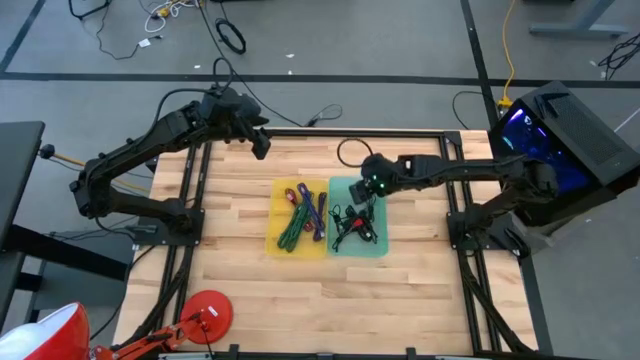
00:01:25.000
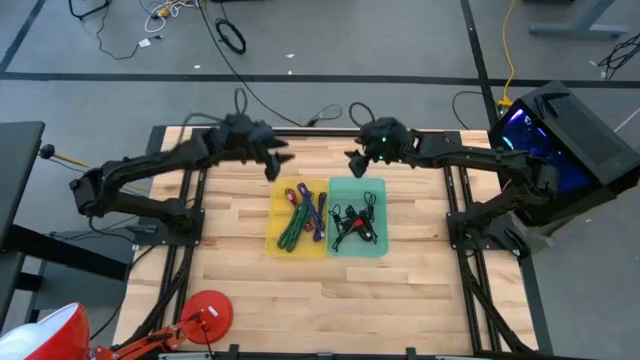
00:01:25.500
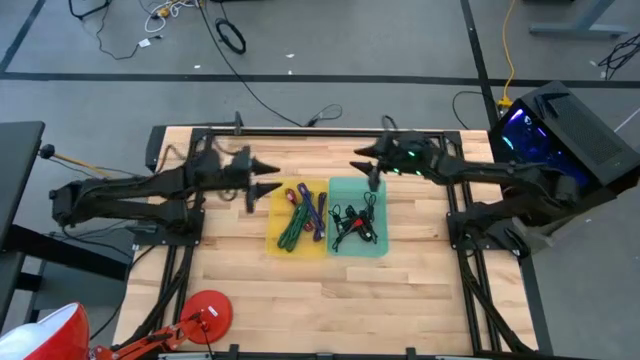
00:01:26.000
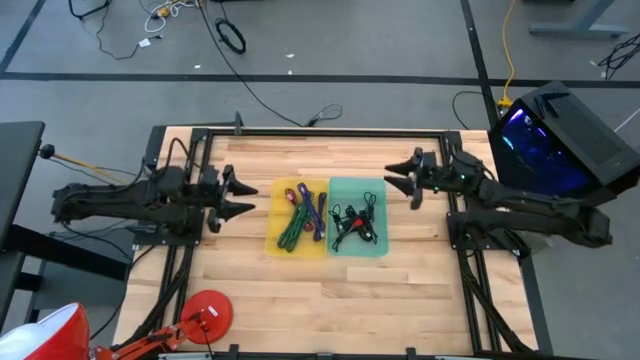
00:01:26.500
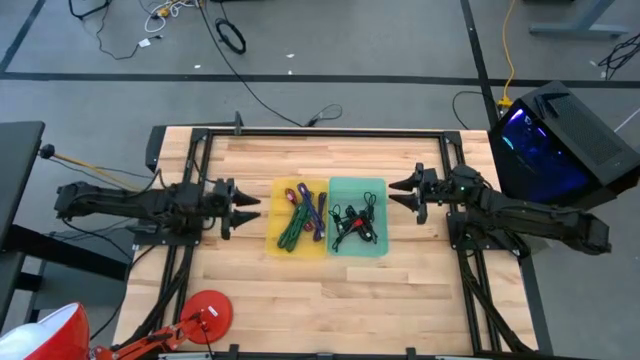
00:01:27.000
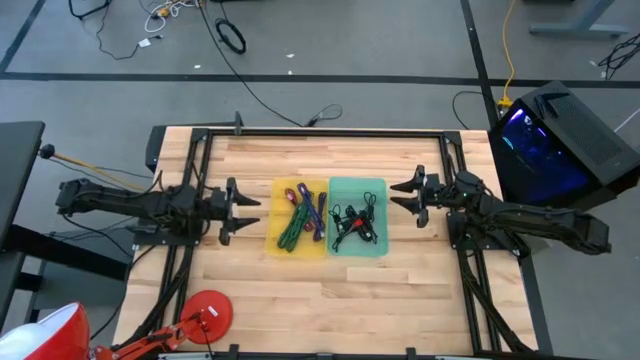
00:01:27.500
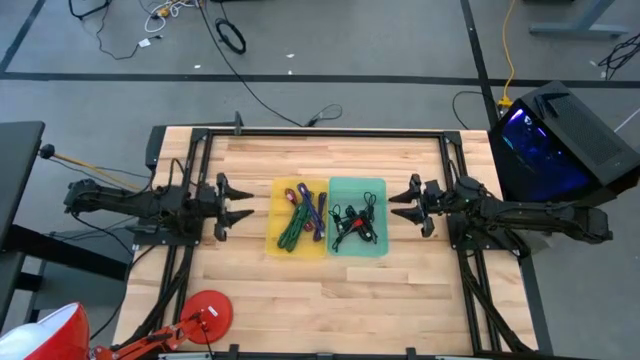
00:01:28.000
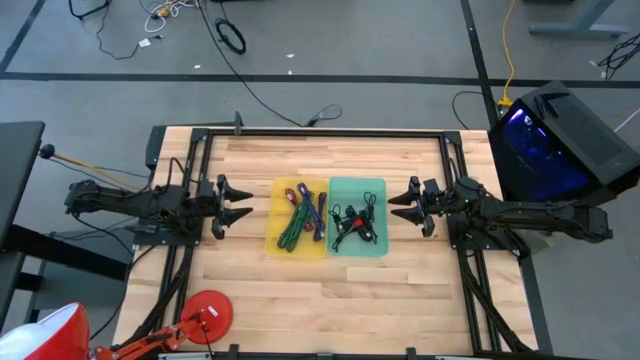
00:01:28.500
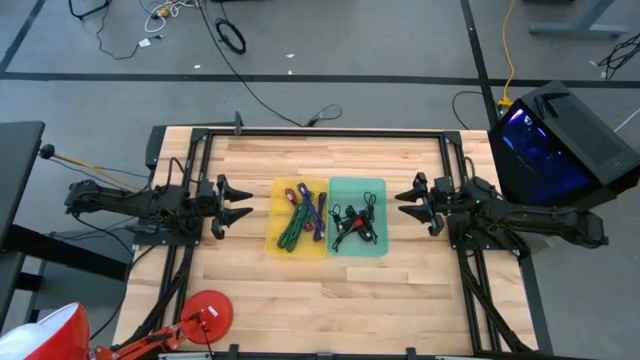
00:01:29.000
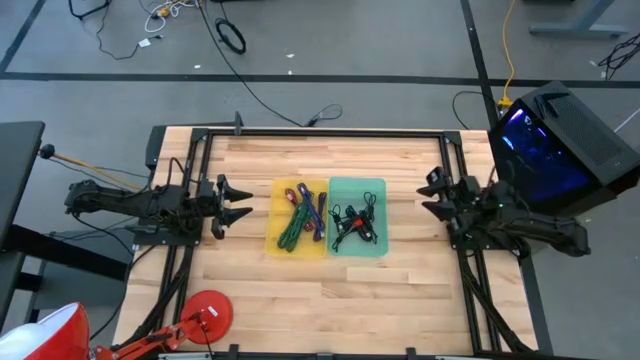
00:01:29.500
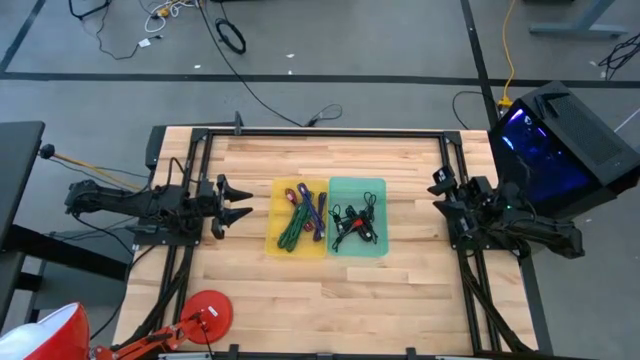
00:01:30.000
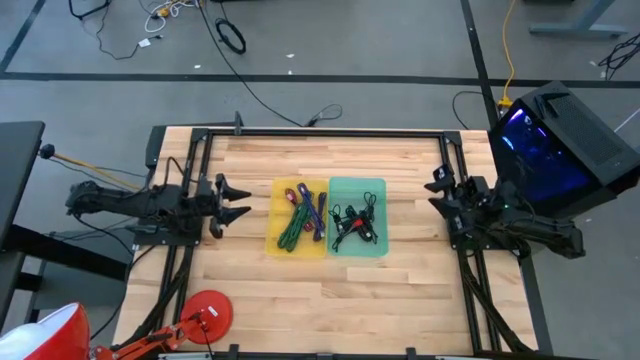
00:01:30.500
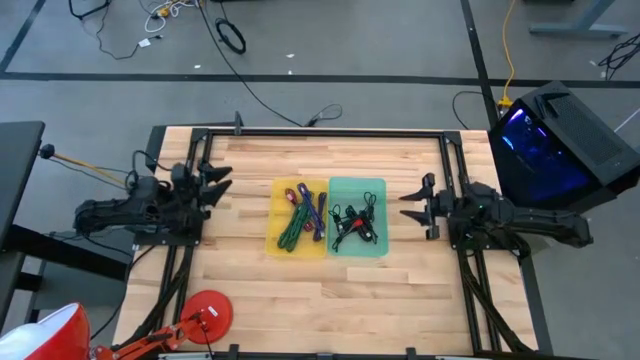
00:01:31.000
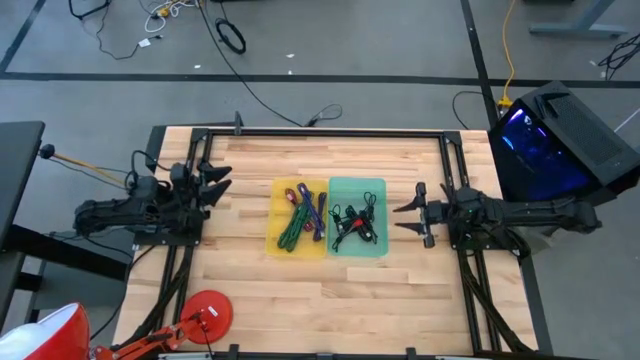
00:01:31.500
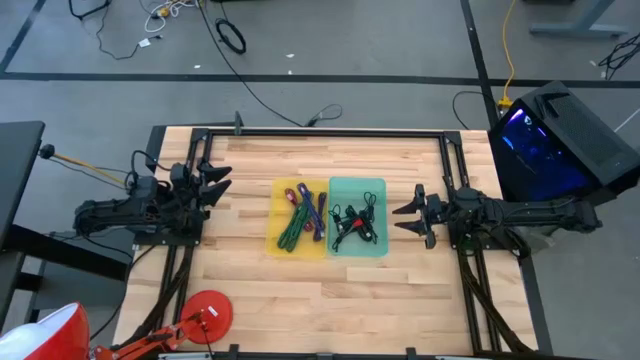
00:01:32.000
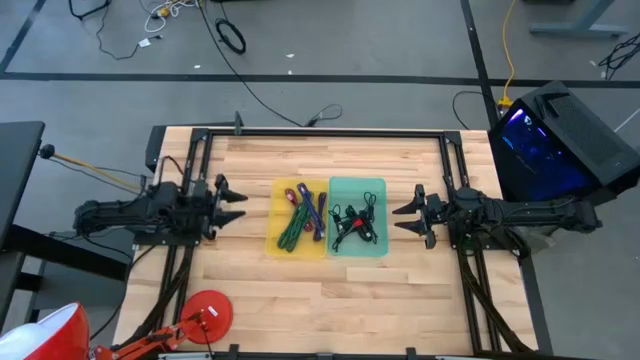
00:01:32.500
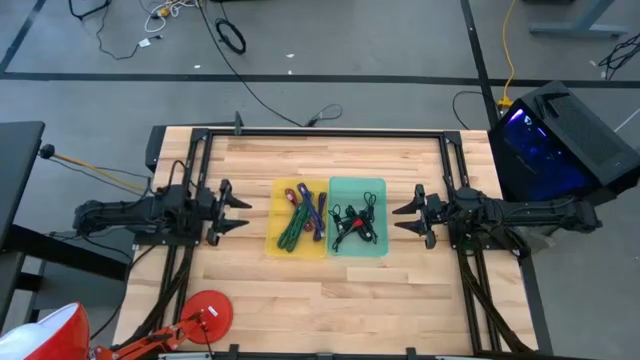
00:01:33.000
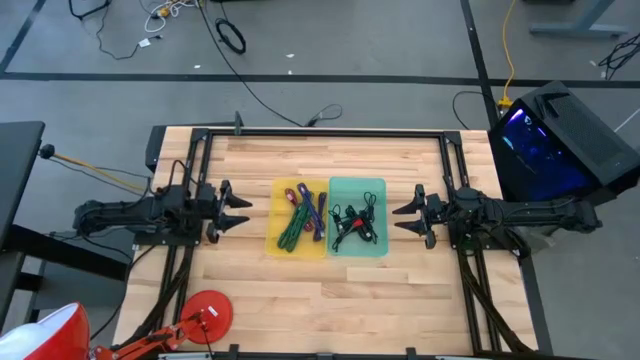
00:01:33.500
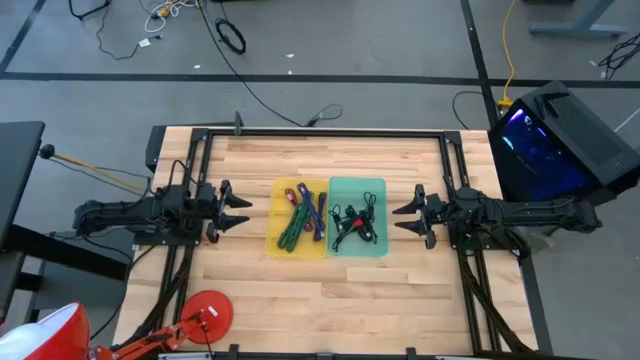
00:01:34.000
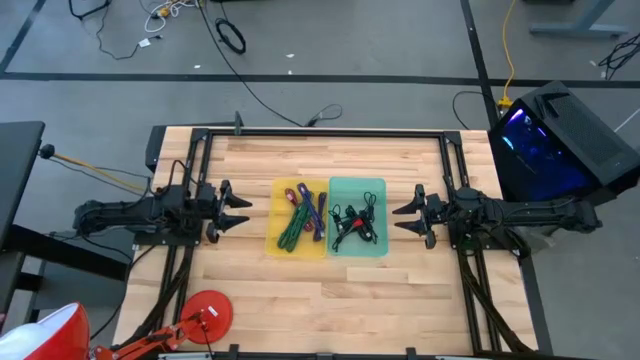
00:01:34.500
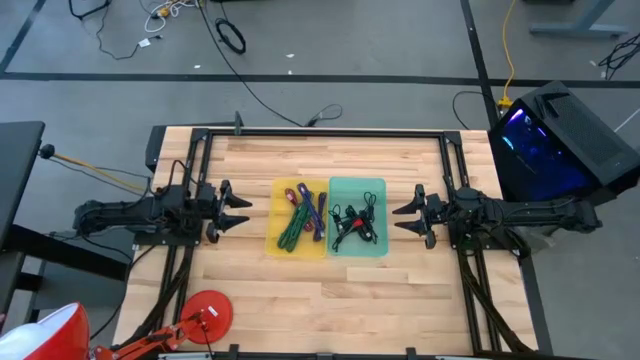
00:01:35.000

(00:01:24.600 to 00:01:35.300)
Task: Pick & Place USB Port
Return to Home Position

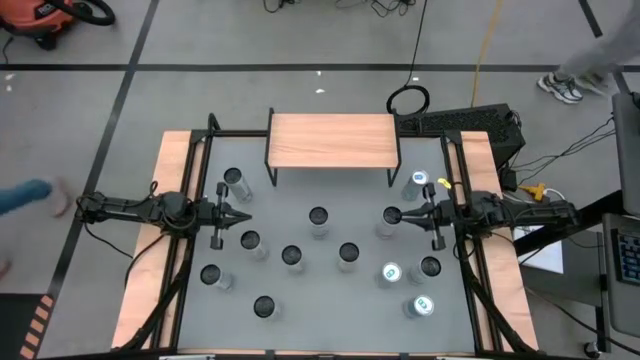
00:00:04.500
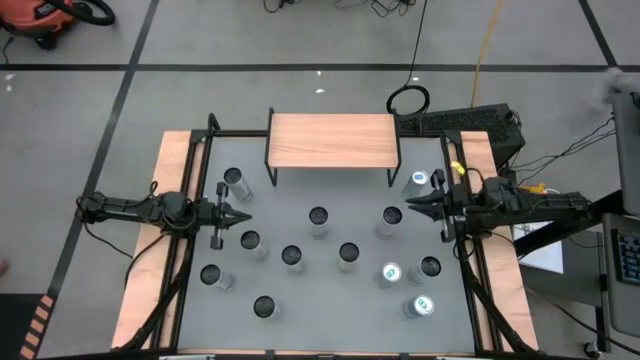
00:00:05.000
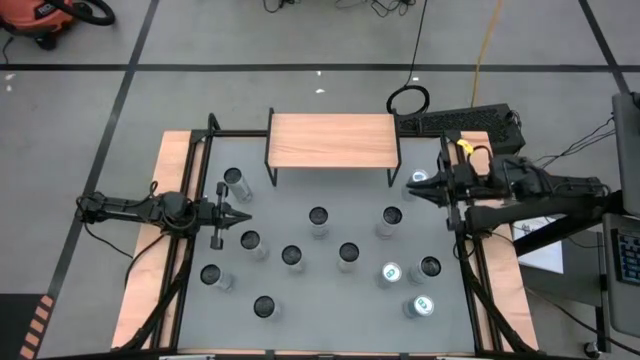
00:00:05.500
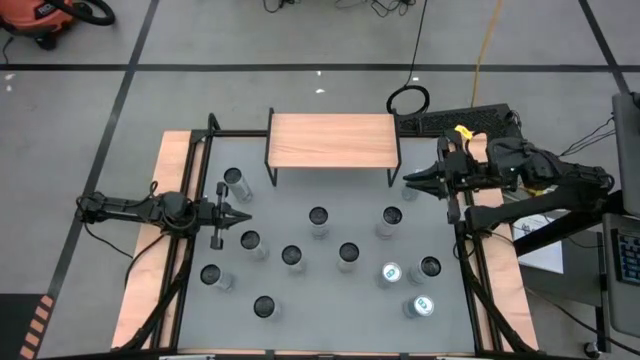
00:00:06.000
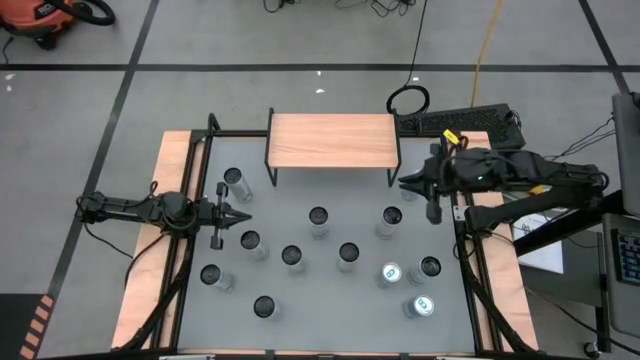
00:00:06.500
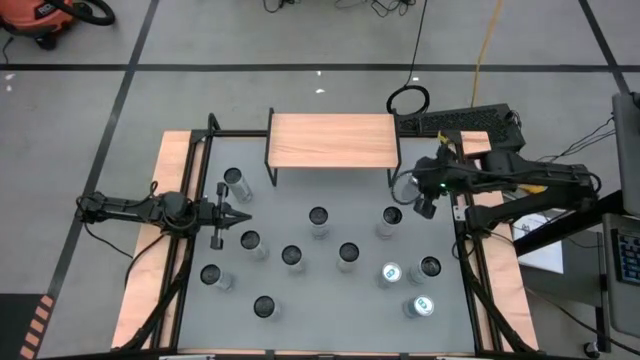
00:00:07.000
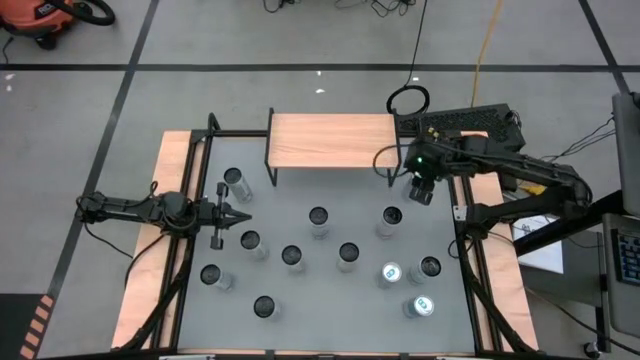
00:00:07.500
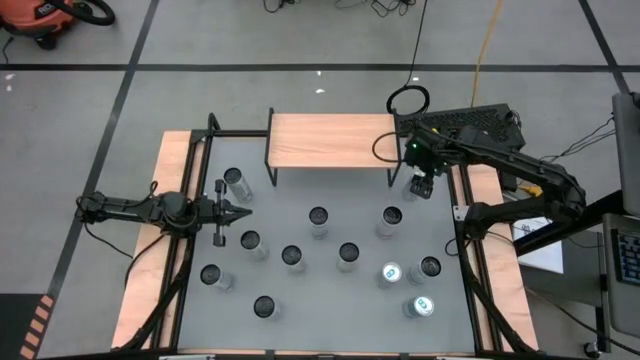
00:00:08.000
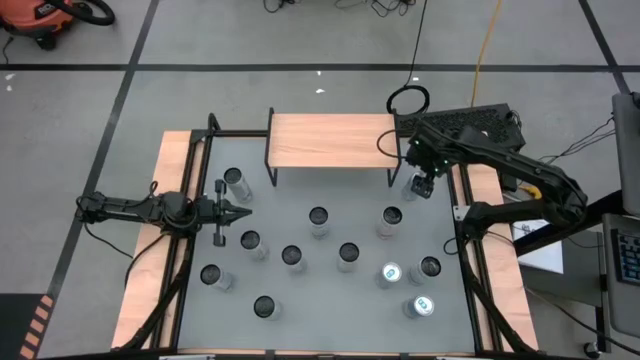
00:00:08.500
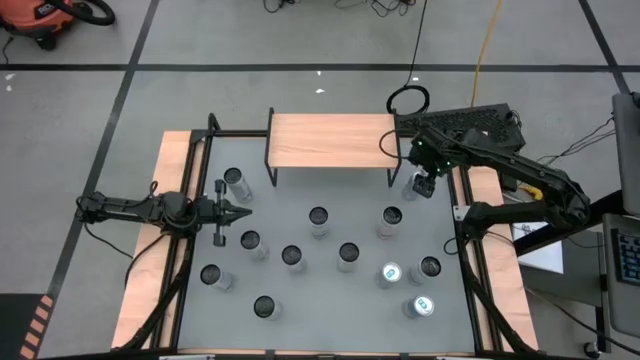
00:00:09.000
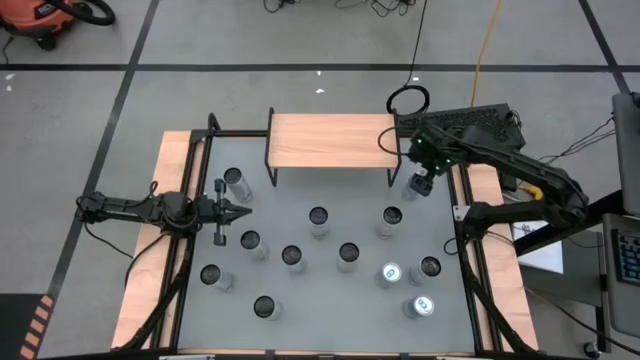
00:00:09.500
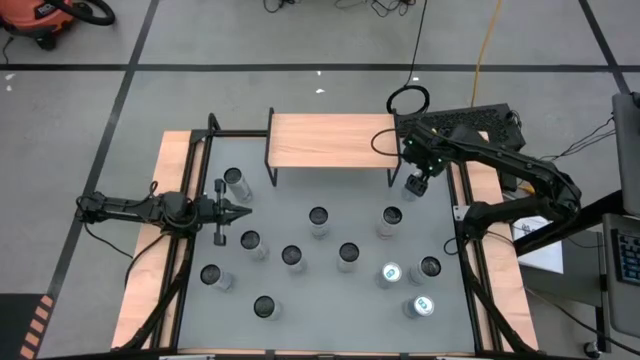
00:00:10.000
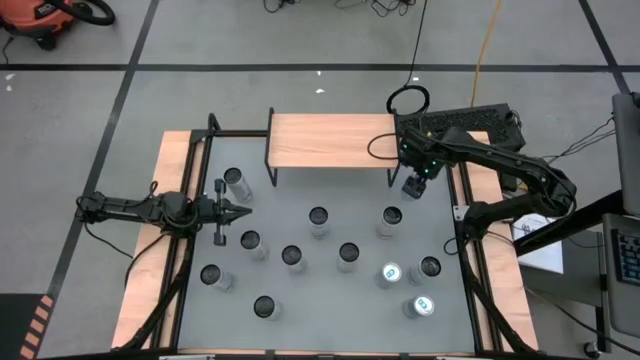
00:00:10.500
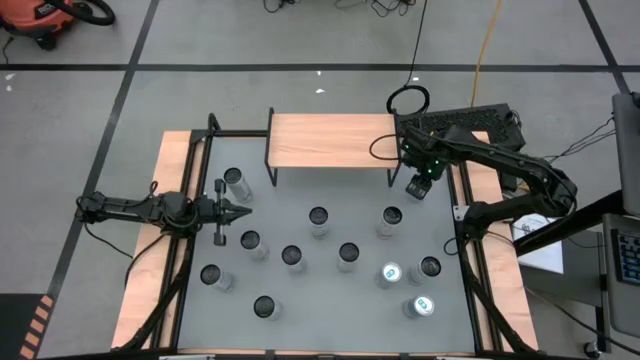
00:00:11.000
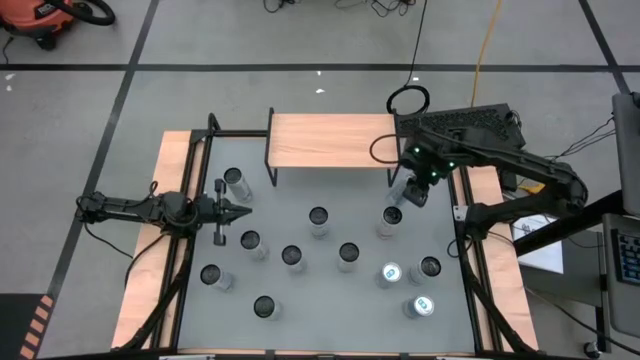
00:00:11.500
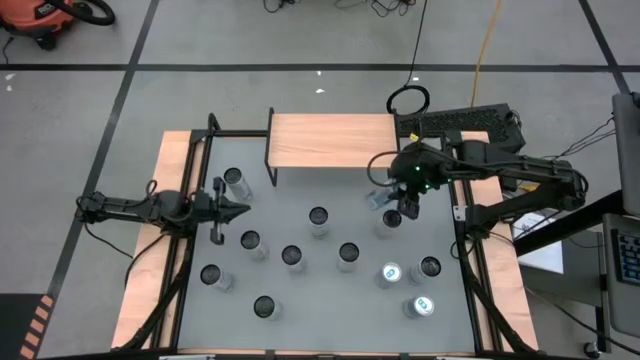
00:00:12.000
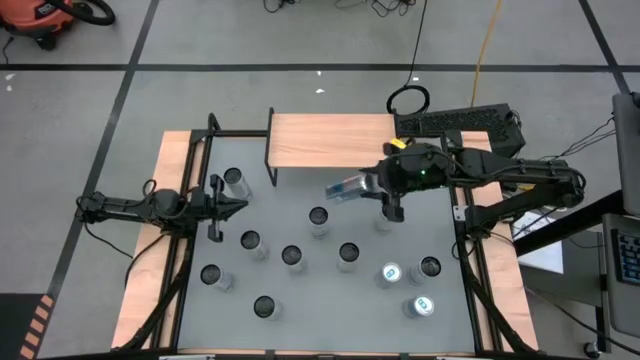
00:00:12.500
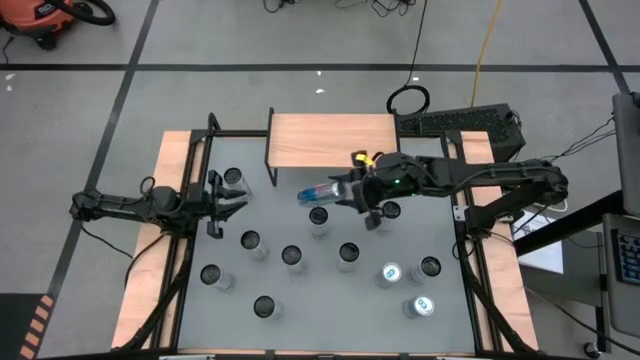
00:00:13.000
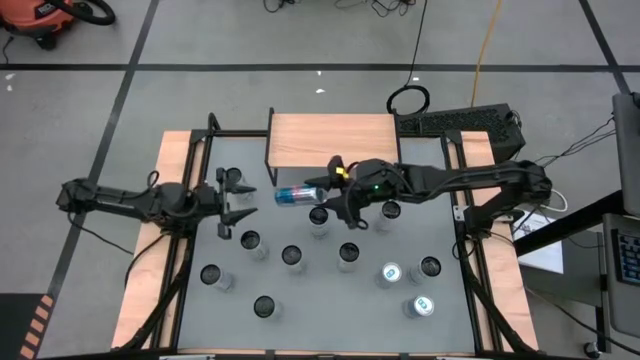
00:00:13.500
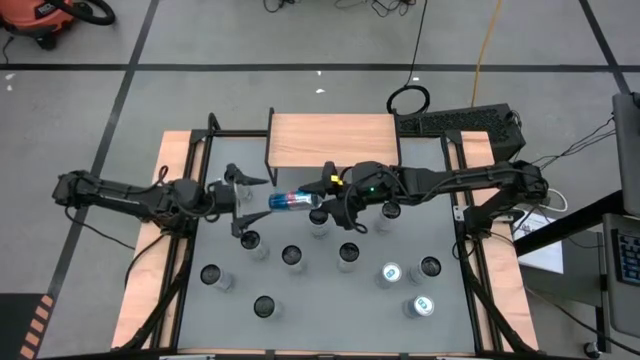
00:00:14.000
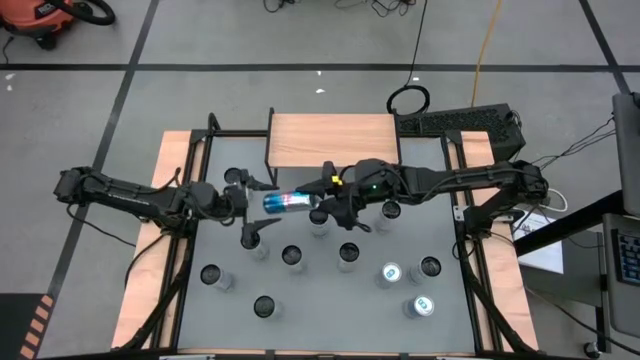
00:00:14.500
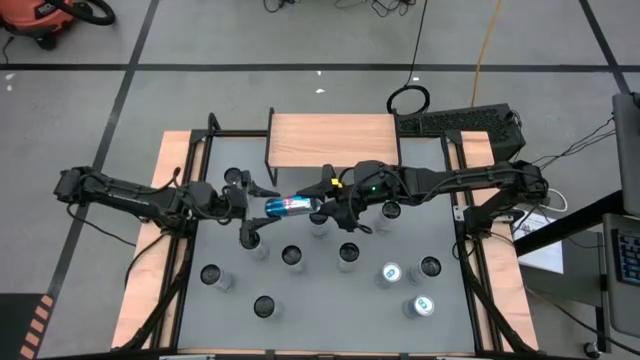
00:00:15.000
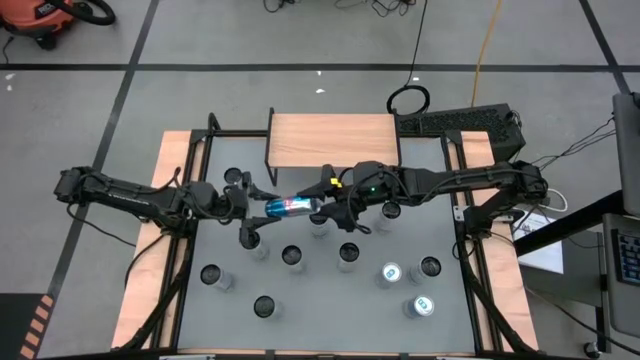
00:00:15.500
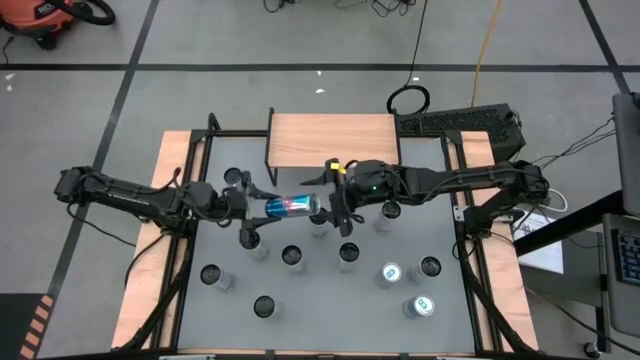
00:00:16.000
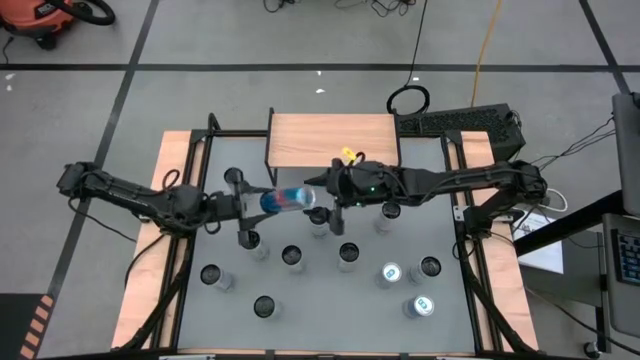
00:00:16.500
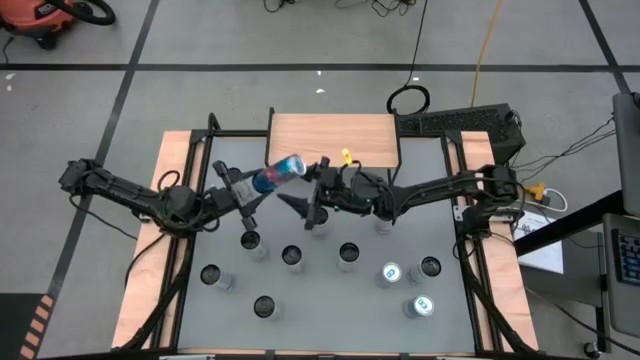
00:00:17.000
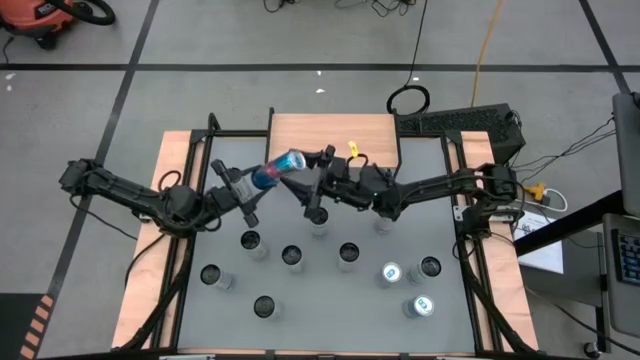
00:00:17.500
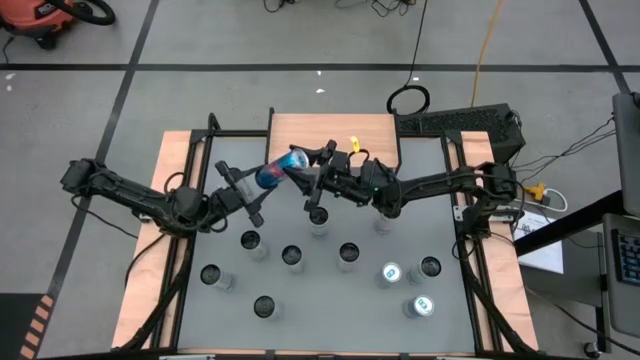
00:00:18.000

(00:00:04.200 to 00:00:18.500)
Task: Place canned beverage on shelf
Put the top blue soda can on the shelf
